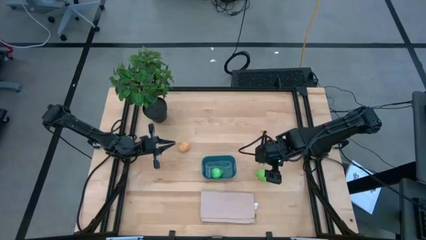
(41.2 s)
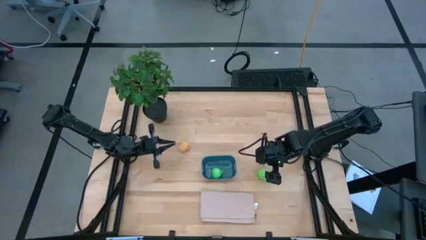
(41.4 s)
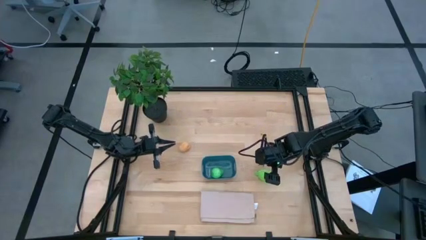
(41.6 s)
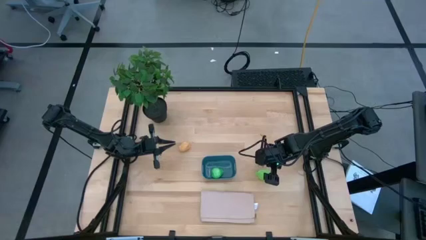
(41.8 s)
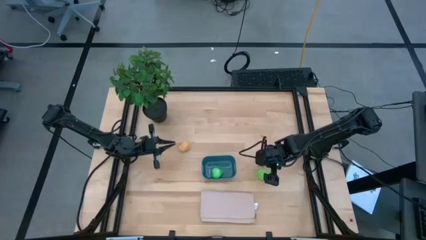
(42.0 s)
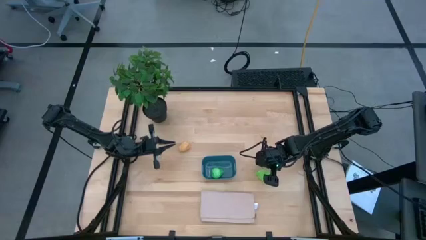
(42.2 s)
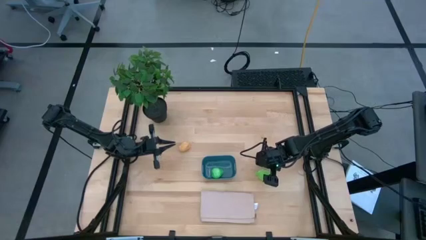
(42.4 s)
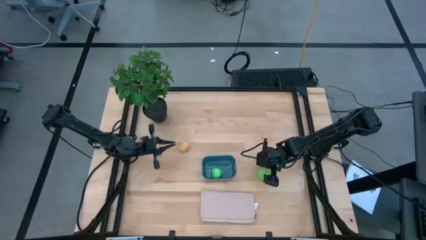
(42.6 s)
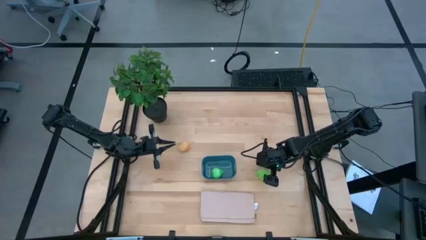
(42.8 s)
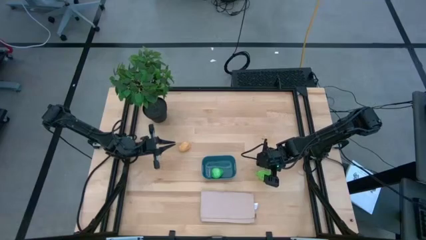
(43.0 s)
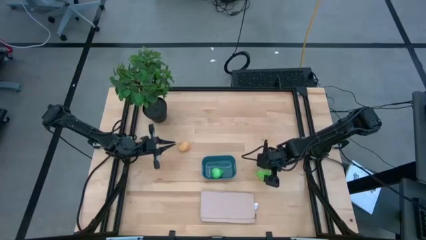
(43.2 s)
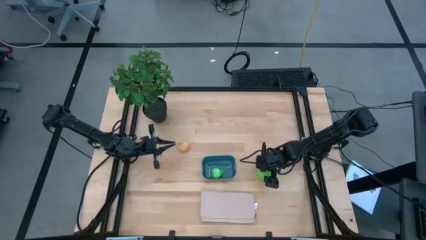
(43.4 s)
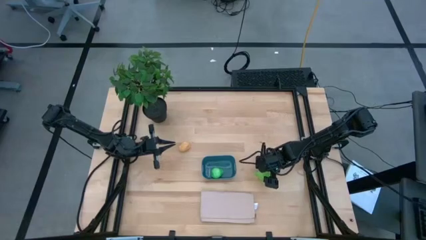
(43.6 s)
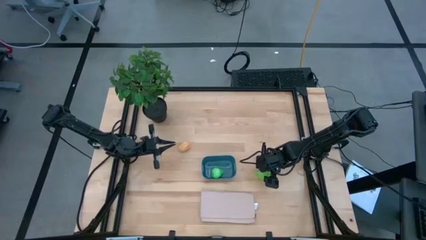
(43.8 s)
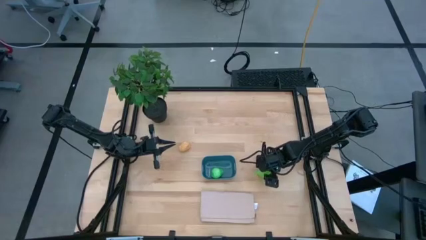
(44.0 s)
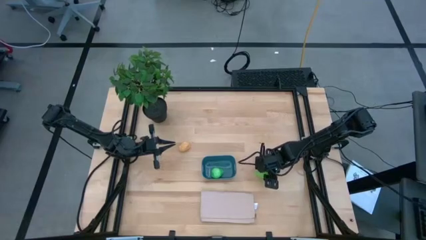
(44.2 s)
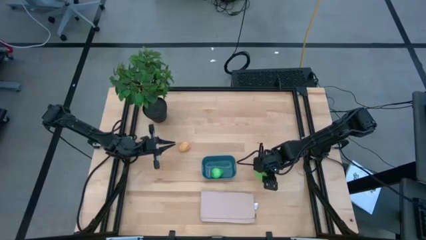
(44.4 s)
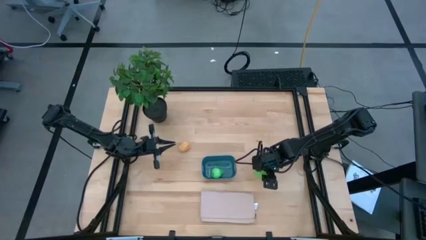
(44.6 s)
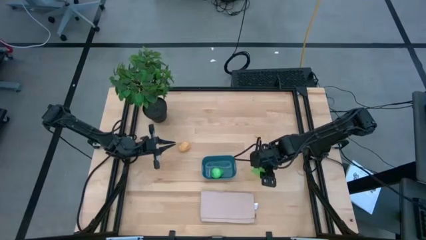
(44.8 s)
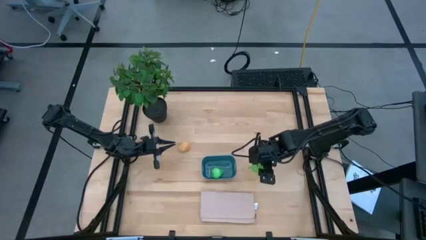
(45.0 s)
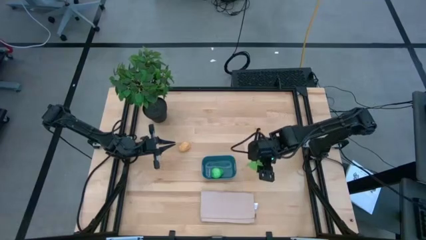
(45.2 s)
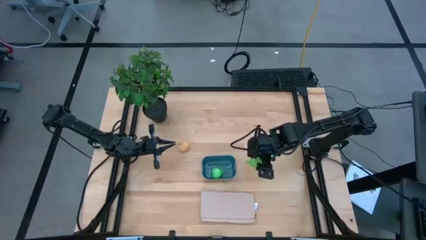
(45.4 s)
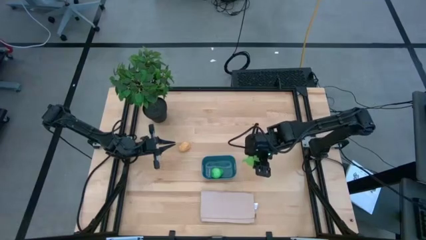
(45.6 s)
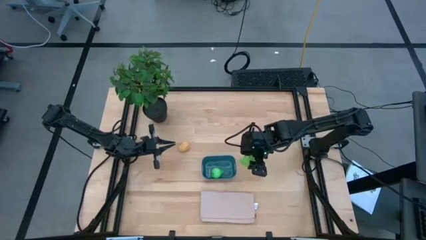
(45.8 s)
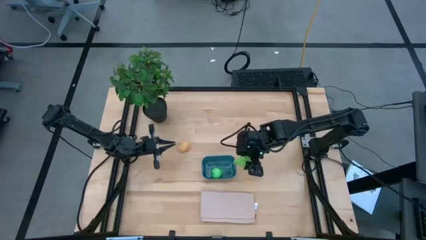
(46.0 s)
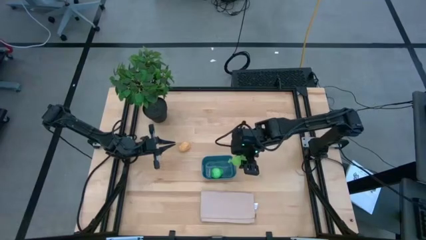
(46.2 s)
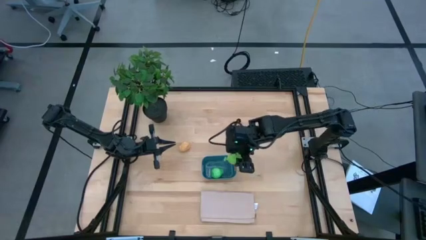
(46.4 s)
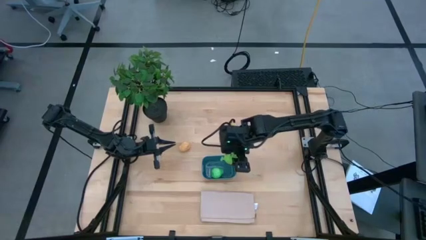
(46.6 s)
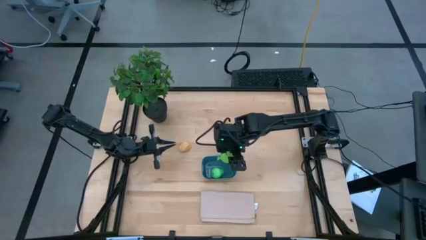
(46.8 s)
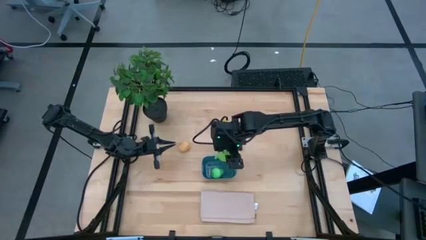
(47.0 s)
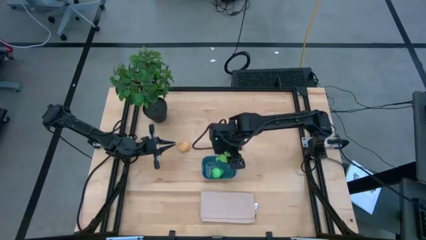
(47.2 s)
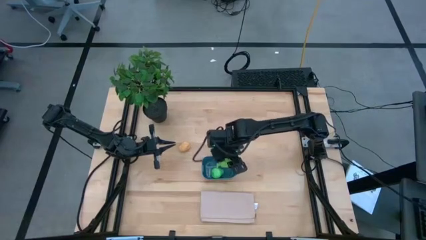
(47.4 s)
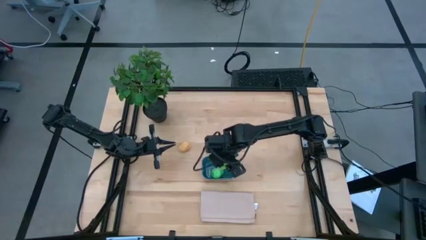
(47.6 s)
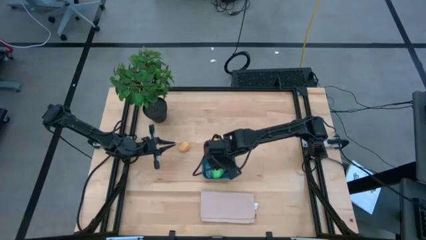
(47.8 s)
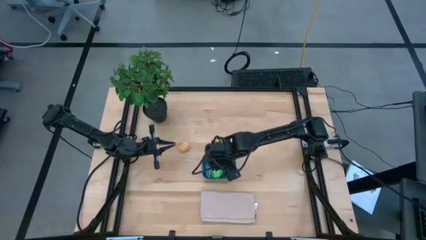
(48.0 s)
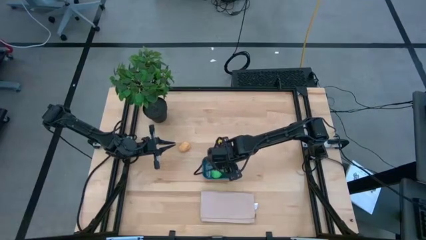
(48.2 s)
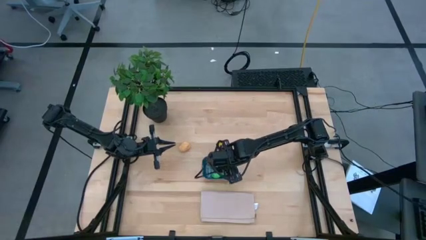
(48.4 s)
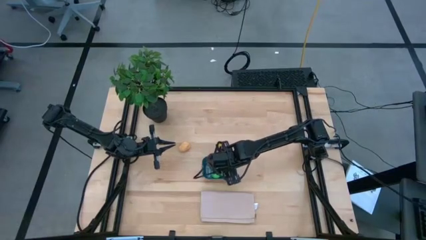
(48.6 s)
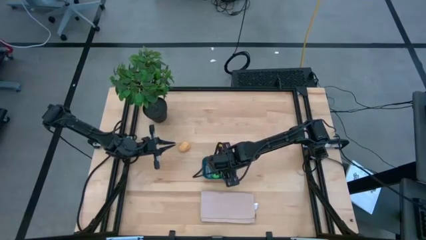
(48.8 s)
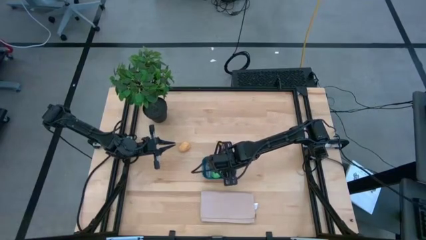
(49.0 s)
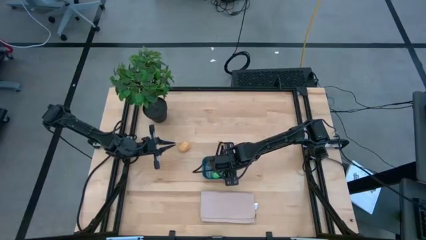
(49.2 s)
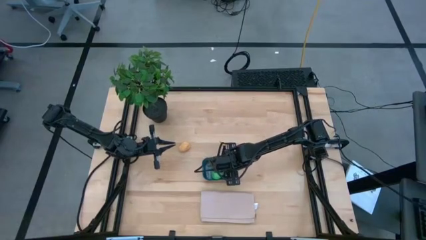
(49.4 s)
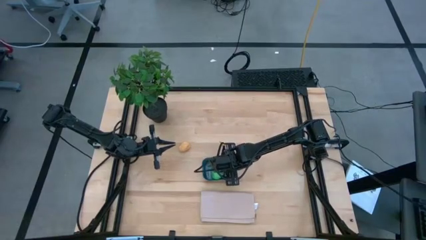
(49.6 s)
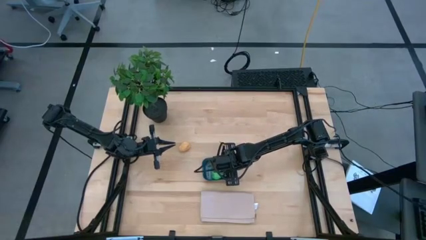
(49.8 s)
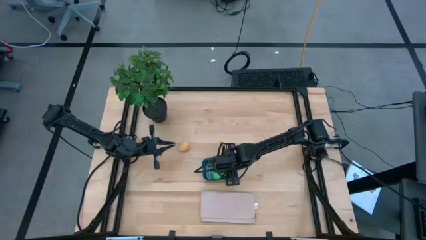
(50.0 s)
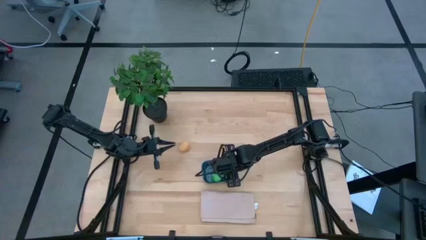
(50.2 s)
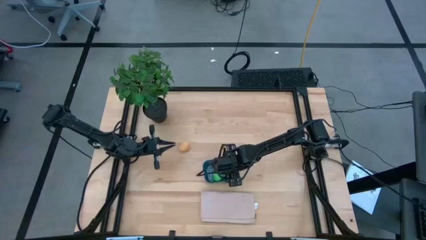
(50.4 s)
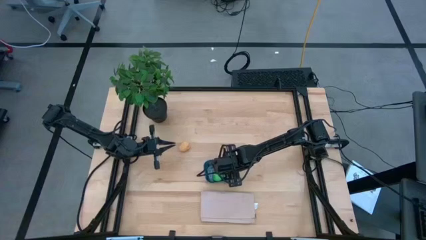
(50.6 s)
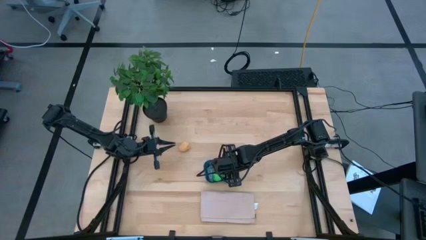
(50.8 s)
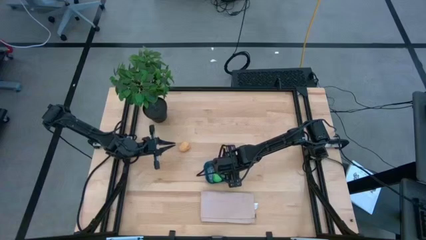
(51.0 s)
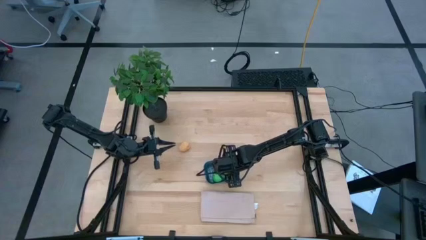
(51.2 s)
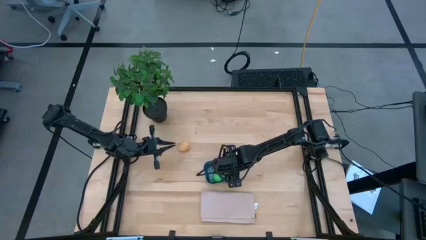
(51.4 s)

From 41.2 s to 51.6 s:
Task: Pick and placing Produce into tupperware
Put the green melon into the blue bin

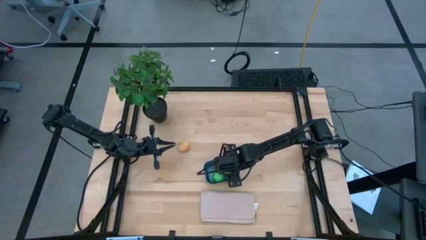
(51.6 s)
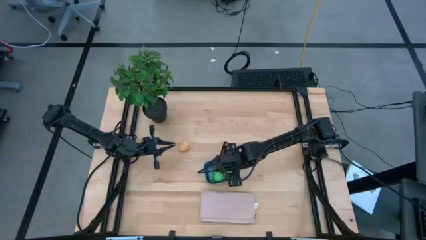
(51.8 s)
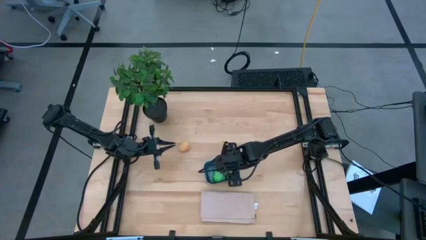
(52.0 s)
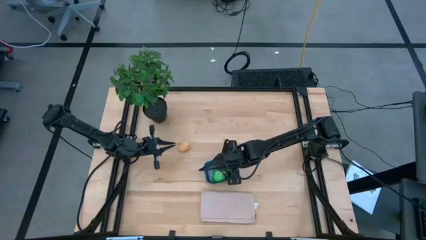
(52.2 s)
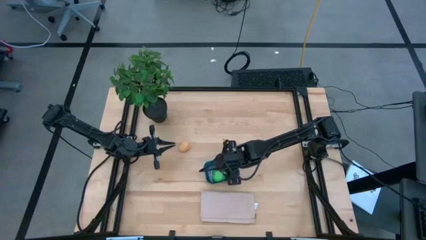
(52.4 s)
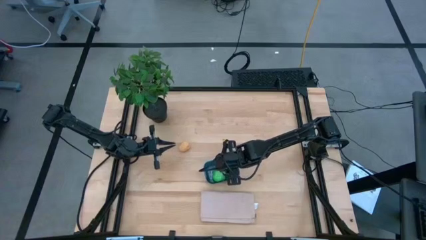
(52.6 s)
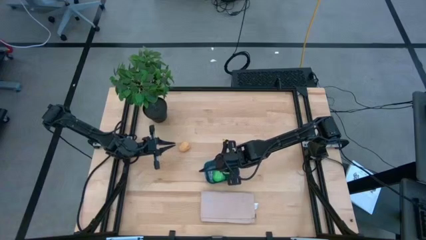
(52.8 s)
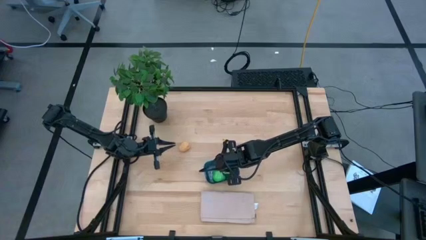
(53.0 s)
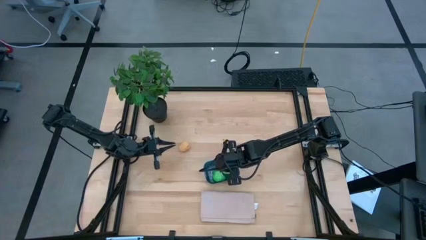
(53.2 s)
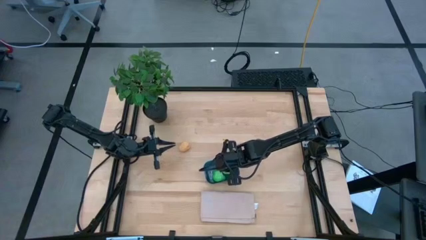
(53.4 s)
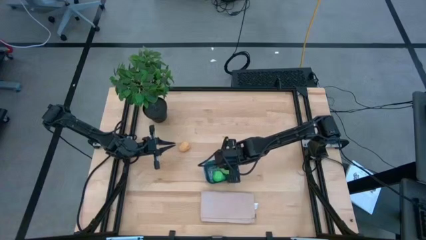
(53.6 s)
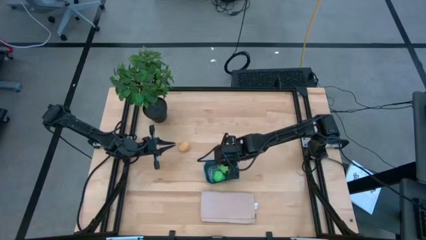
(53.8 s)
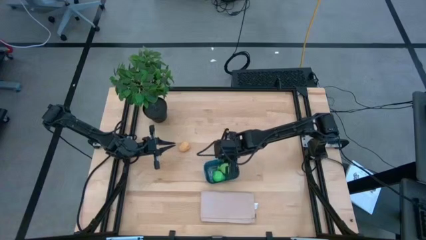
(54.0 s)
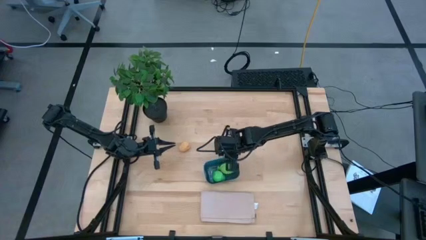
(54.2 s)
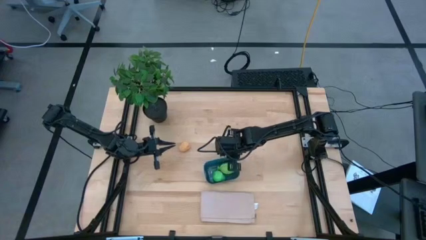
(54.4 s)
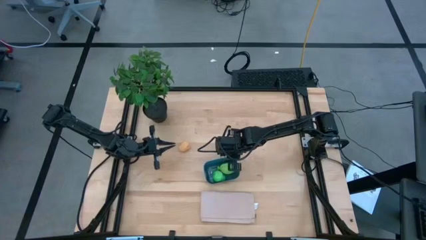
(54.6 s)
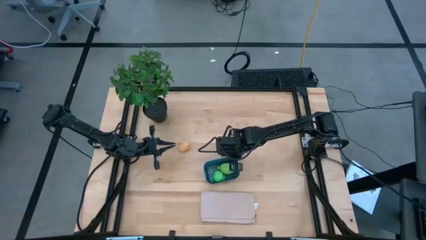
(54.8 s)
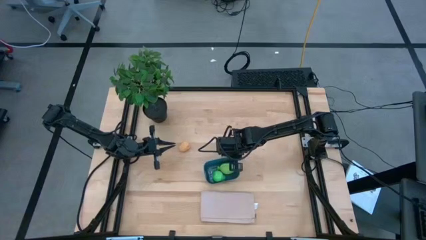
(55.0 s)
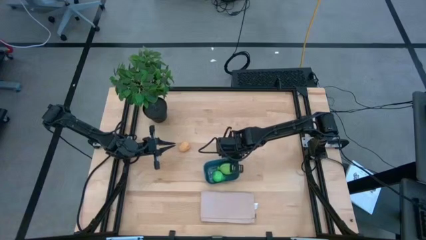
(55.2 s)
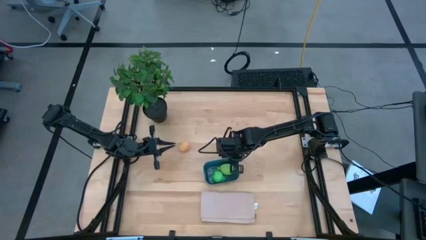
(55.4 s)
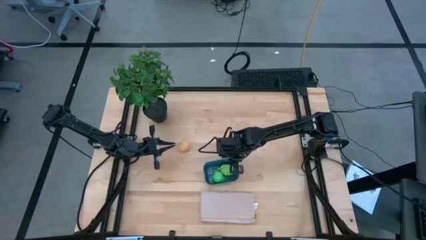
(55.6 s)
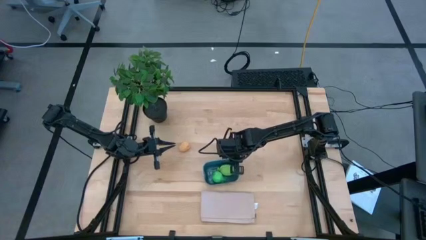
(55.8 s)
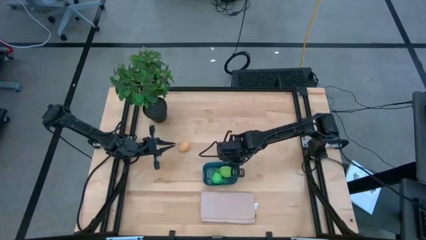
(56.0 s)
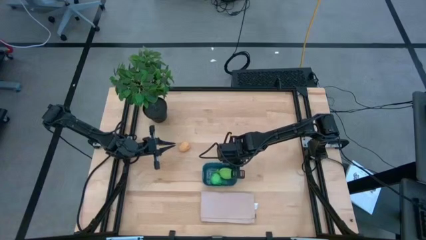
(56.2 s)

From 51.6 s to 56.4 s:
Adjust the blue bin

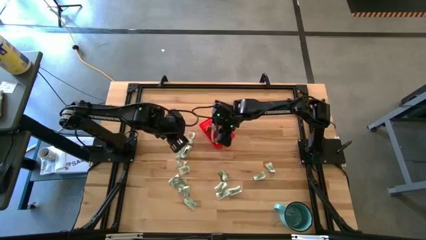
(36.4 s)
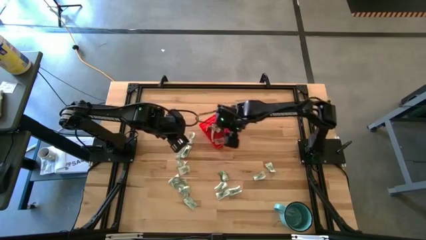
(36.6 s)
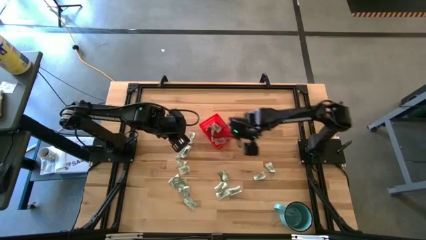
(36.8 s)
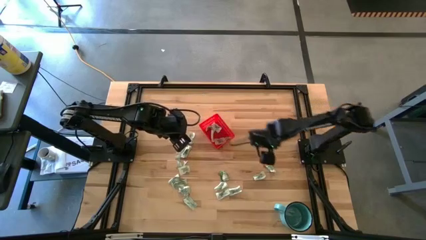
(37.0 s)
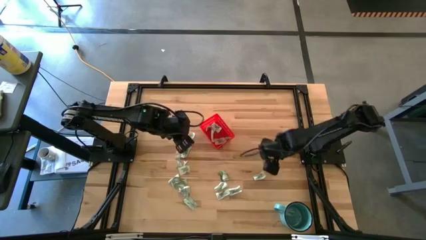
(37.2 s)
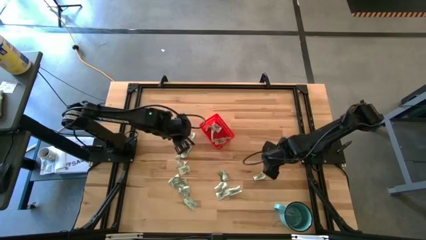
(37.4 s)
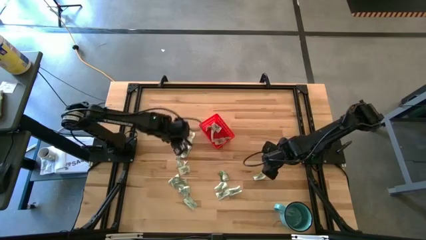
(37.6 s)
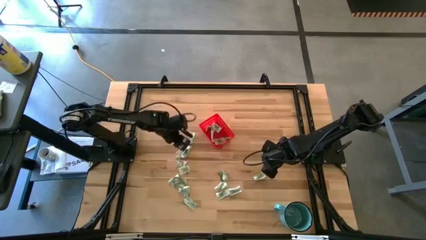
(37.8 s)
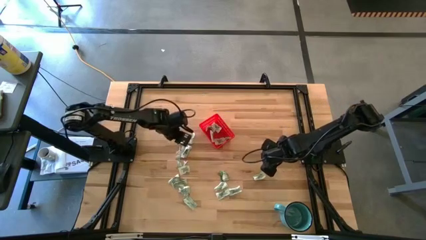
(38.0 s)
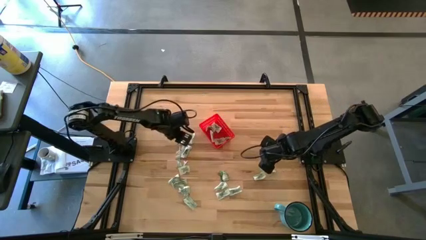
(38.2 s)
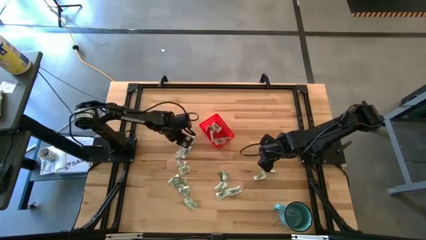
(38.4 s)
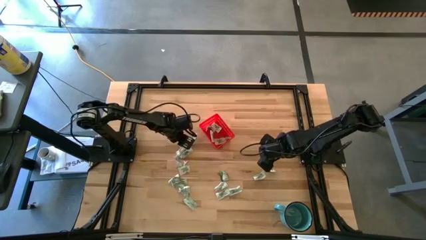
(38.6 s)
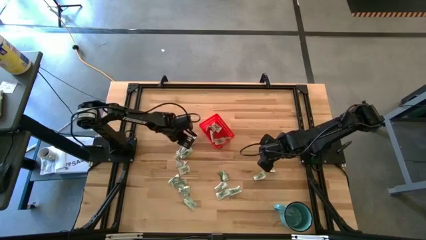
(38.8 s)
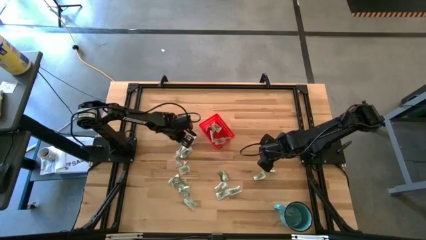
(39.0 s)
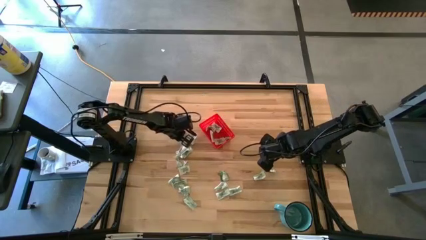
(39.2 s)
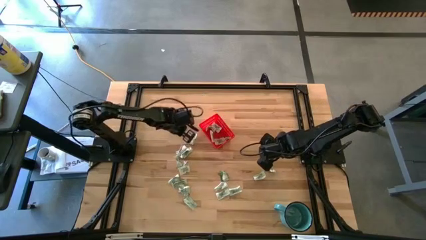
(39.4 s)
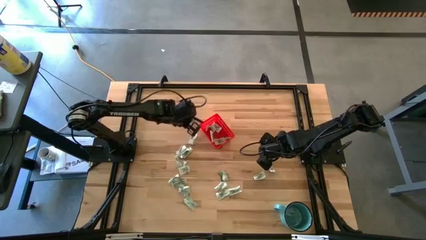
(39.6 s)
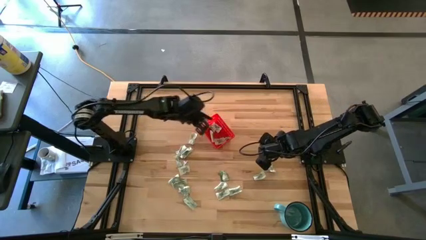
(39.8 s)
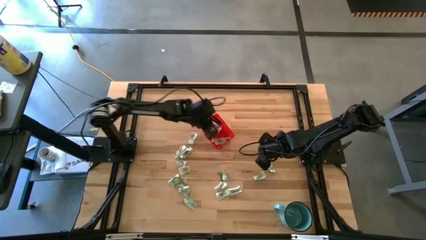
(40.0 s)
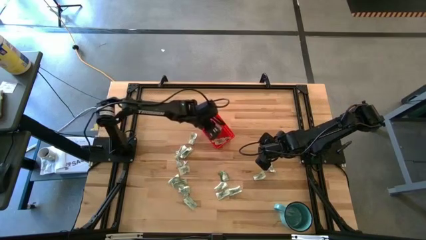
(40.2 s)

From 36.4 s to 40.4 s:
Task: Pick and place Stevia / Truvia into bins
Put the truvia packet into the red basket
